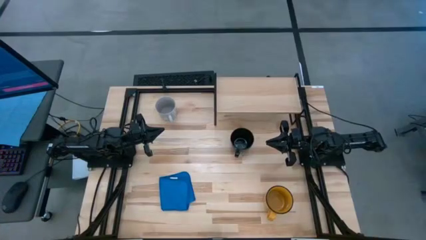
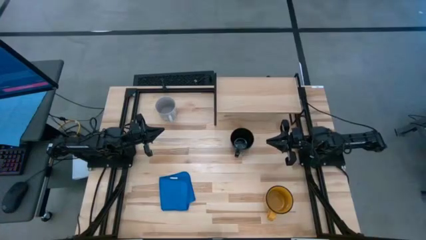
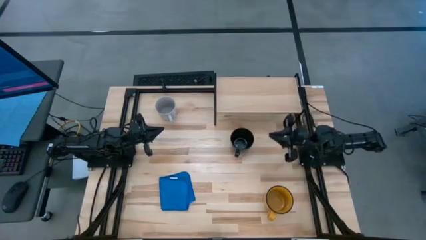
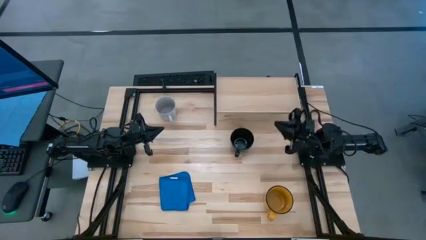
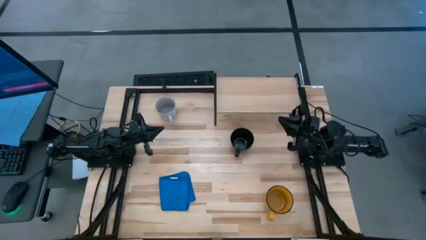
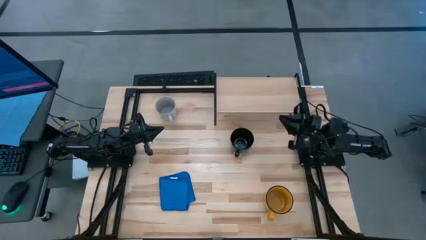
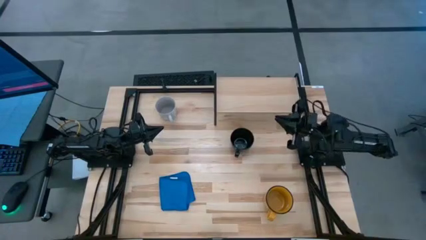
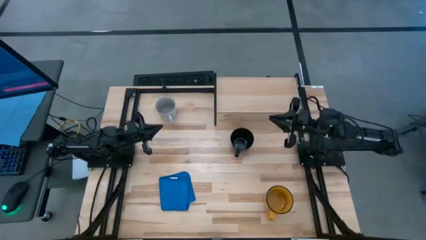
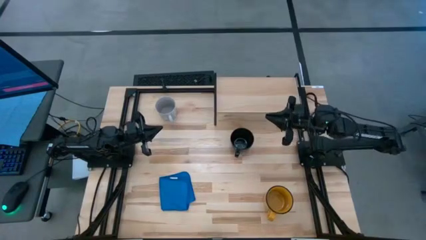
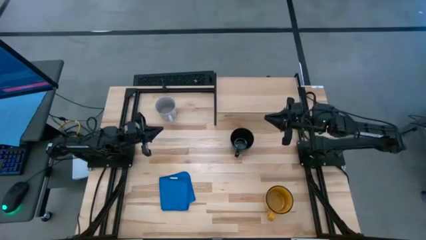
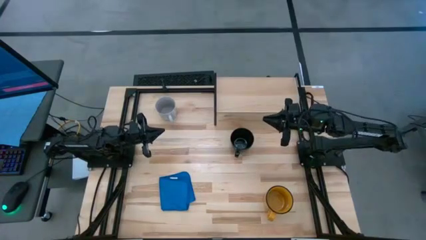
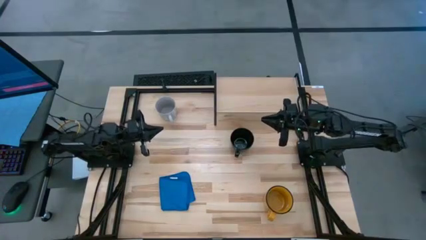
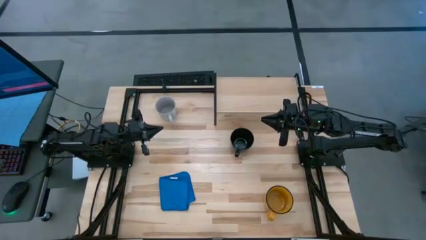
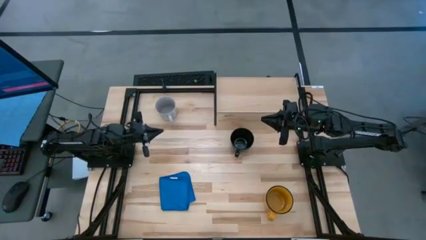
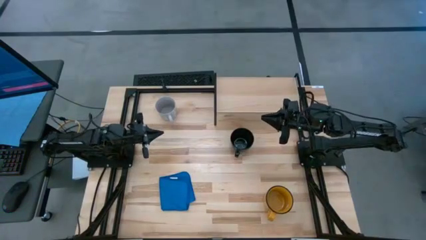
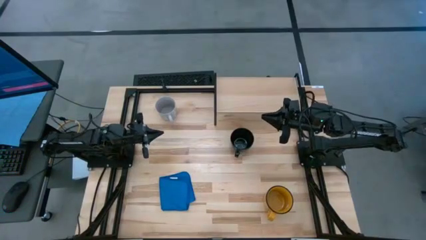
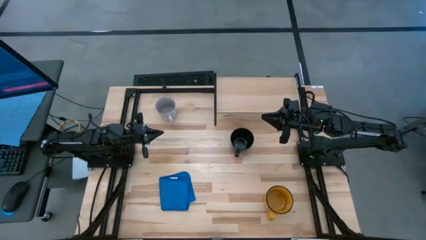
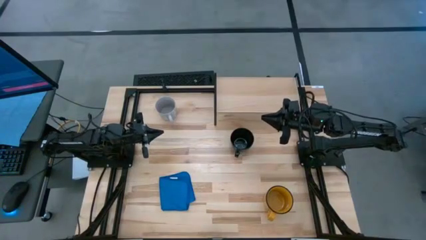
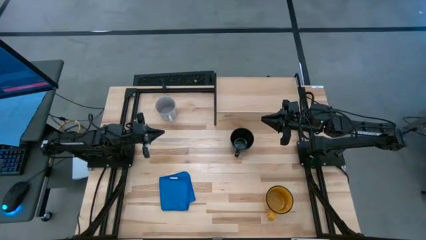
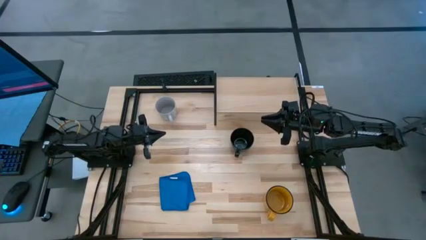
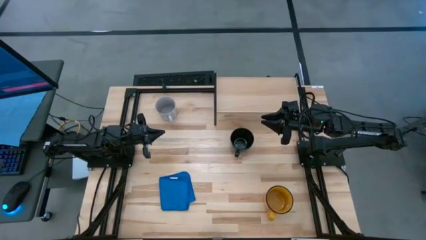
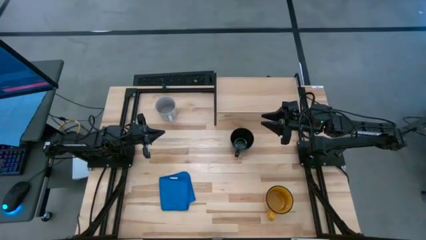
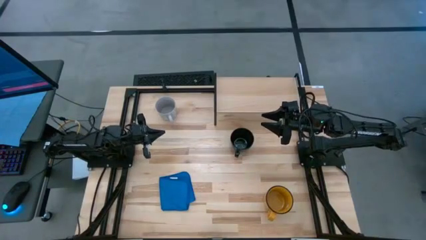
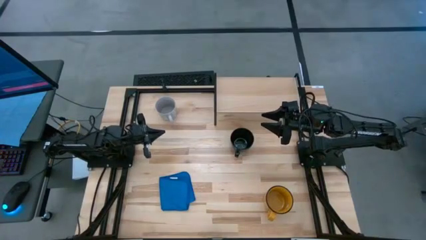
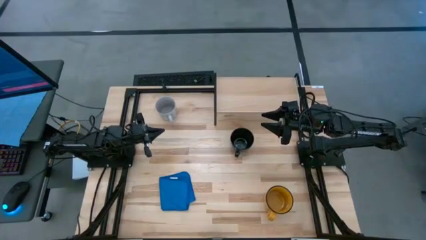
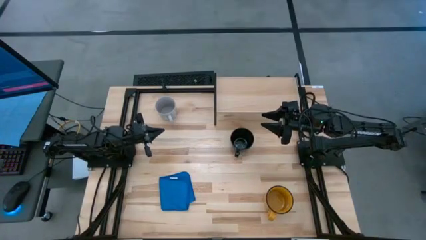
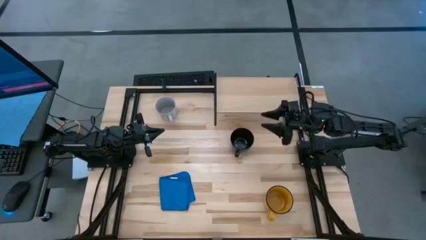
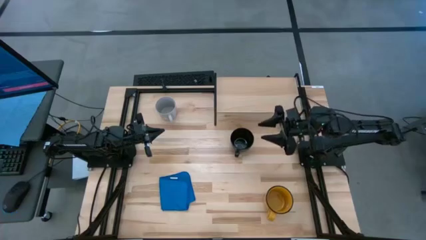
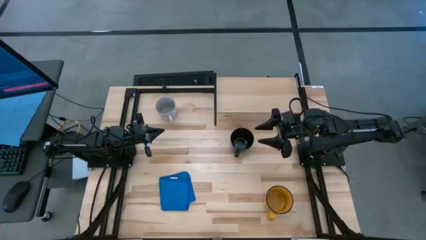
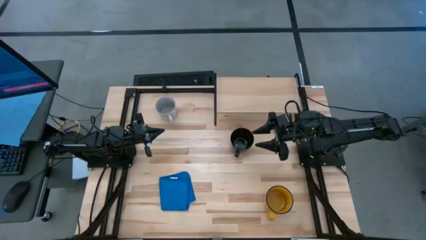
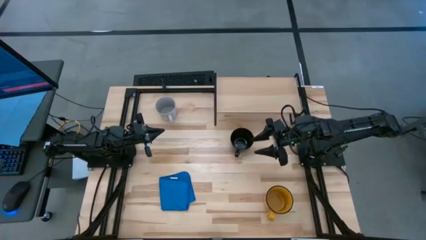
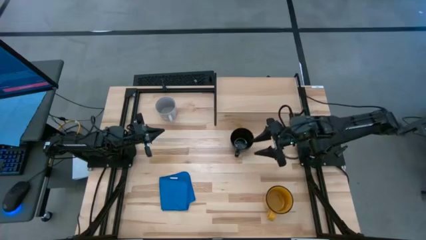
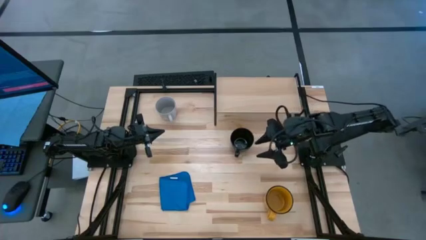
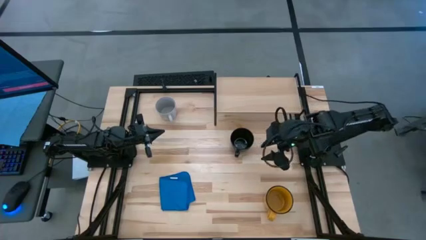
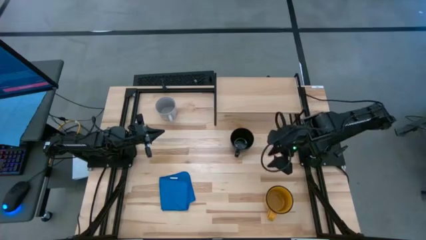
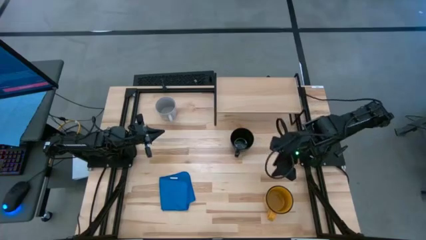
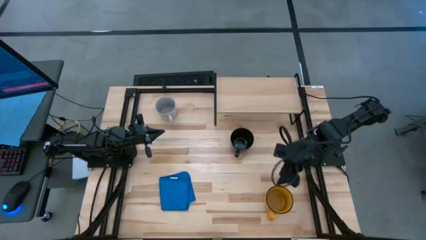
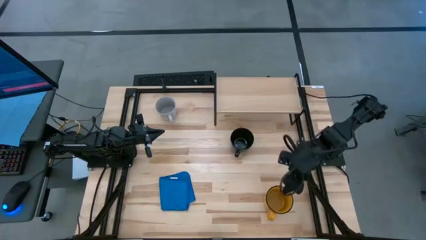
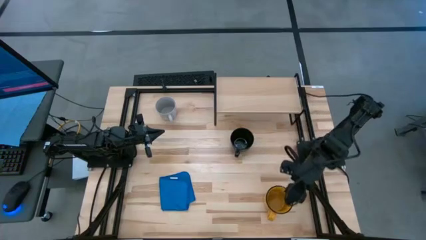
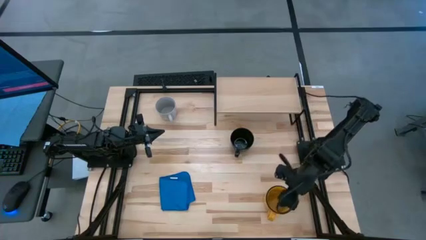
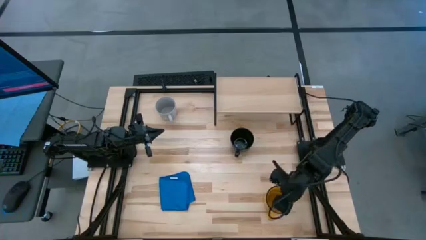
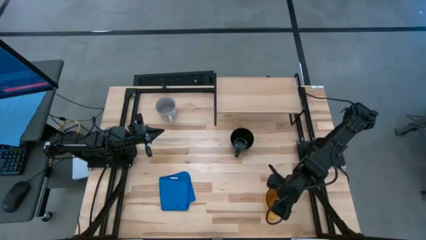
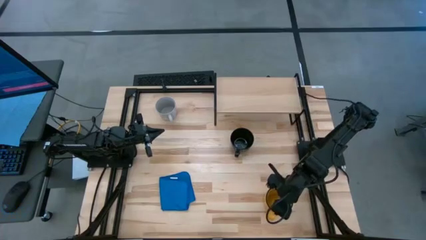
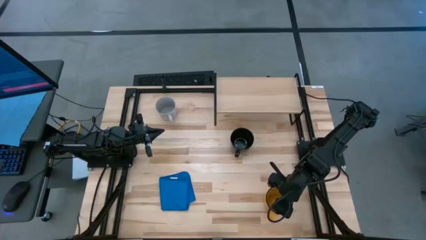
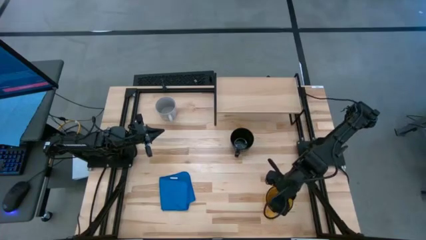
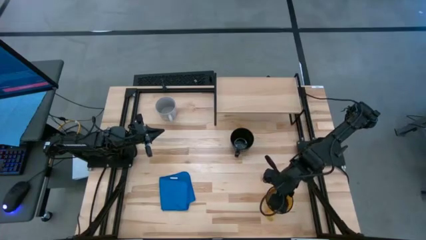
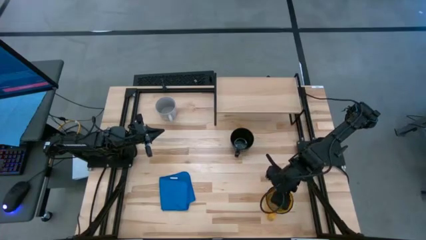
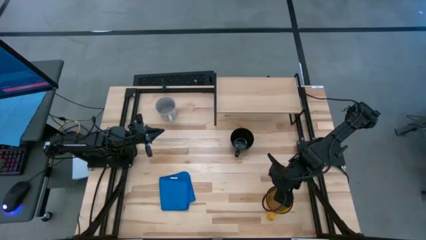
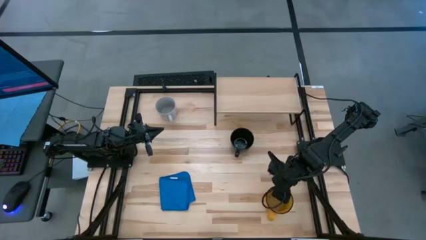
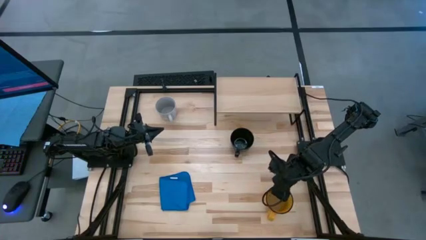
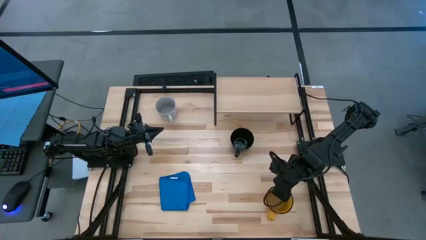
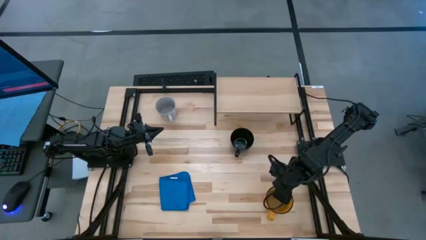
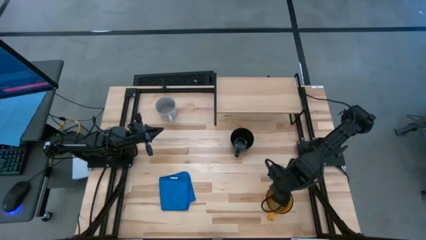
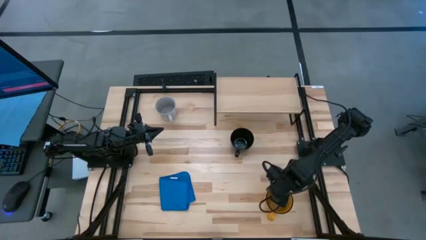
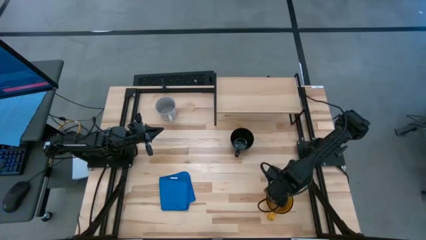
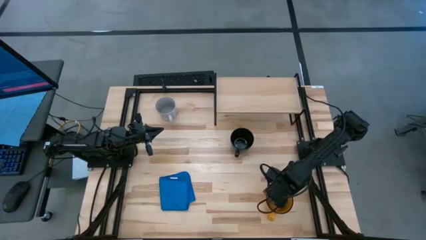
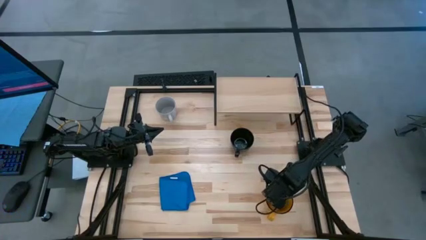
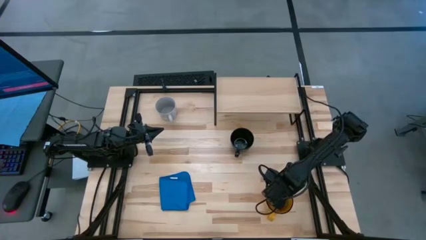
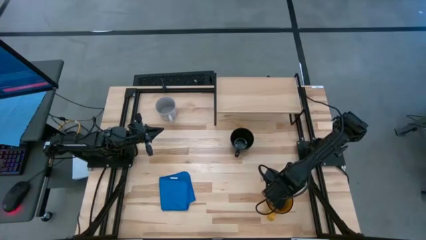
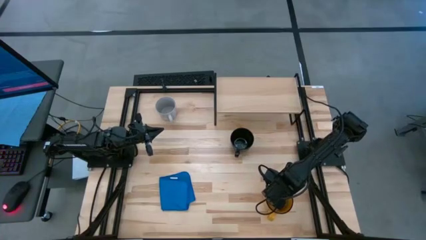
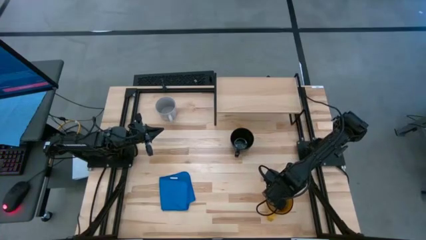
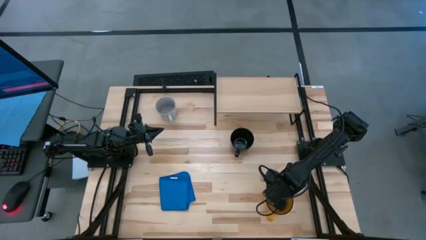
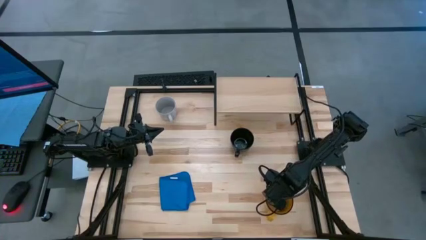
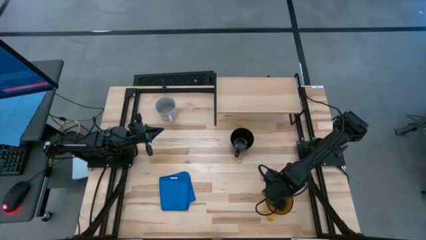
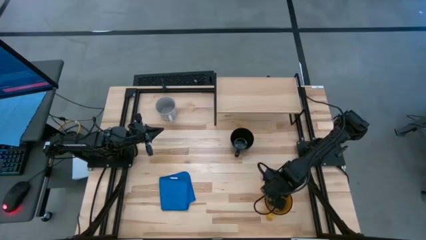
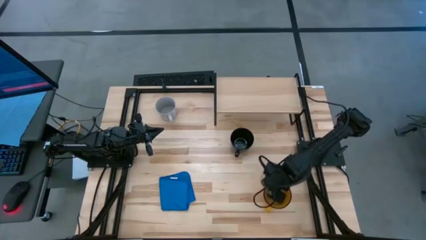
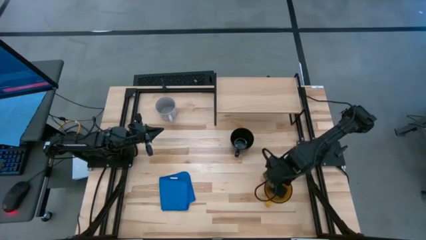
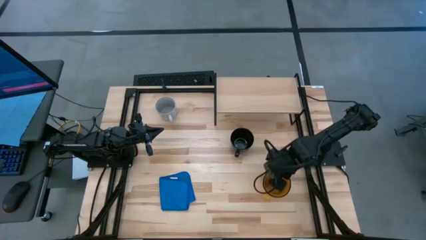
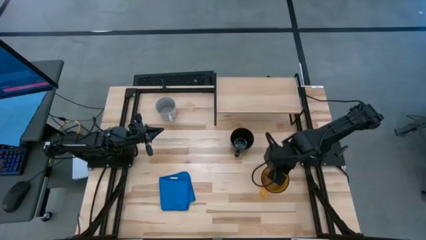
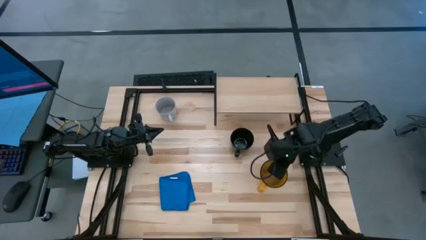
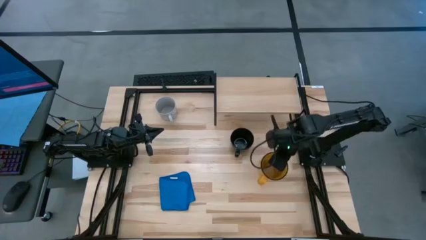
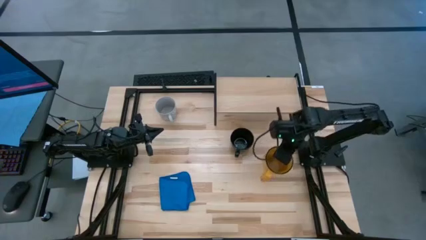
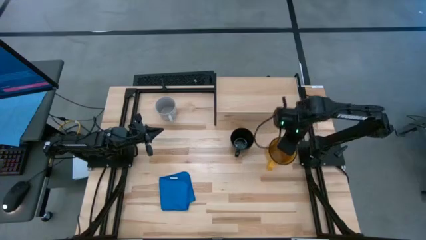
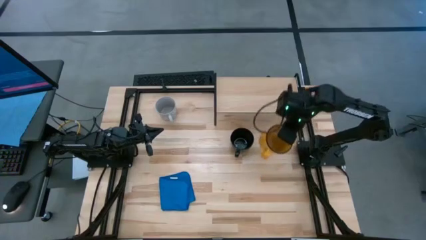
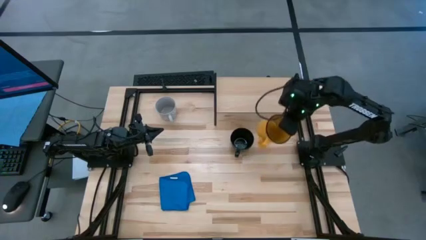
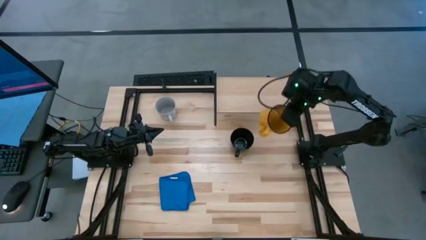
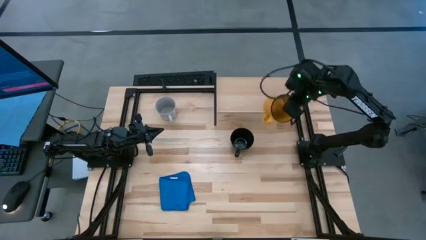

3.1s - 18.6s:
Task: Stack small to large cups/mugs on shelf
Put the yellow mug on the shelf
